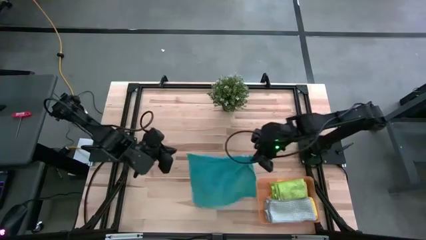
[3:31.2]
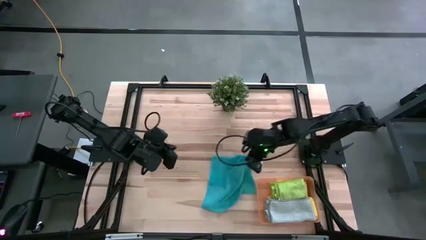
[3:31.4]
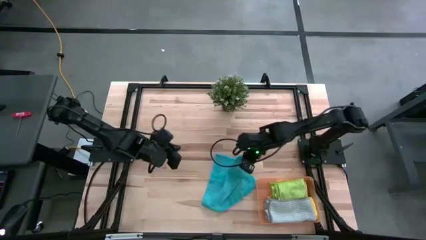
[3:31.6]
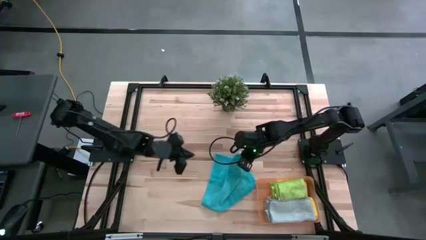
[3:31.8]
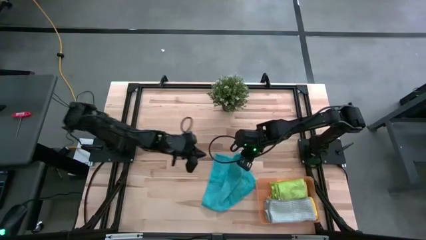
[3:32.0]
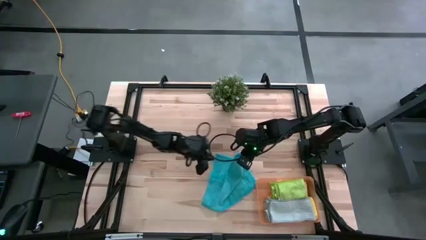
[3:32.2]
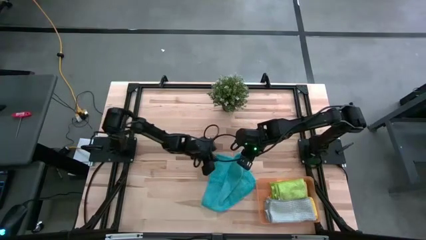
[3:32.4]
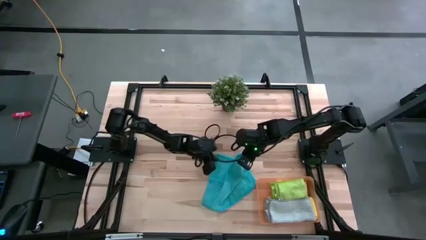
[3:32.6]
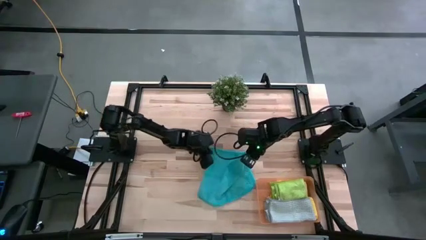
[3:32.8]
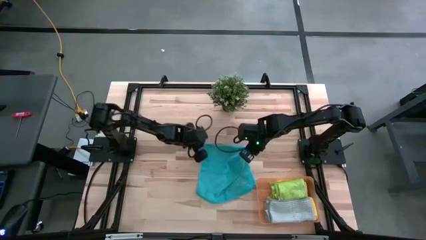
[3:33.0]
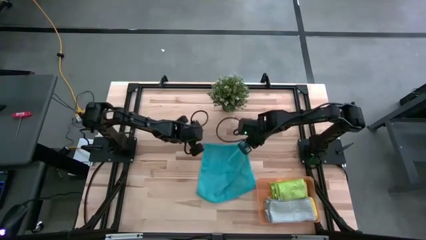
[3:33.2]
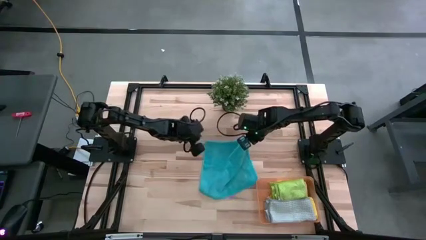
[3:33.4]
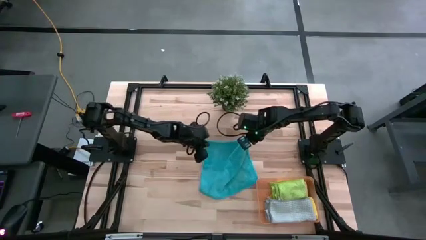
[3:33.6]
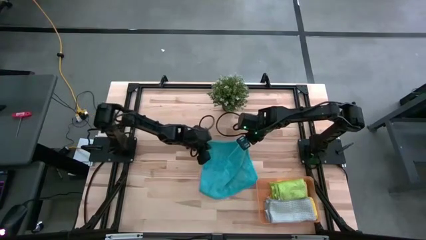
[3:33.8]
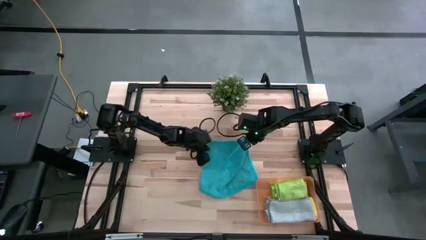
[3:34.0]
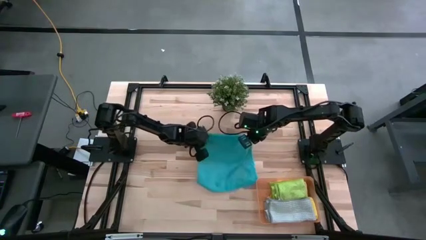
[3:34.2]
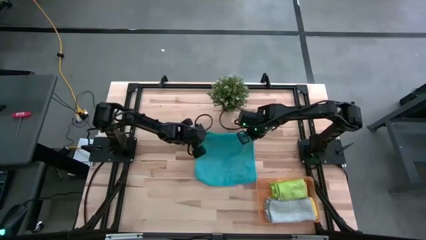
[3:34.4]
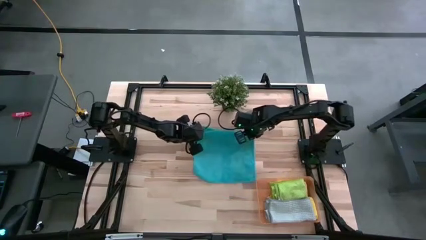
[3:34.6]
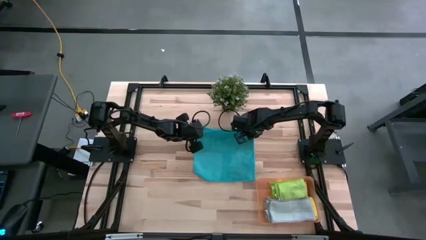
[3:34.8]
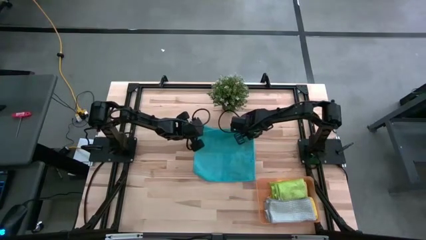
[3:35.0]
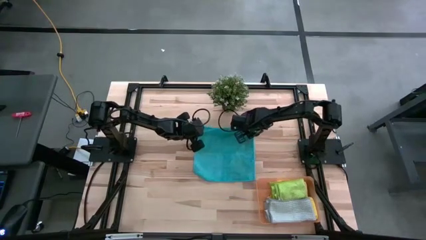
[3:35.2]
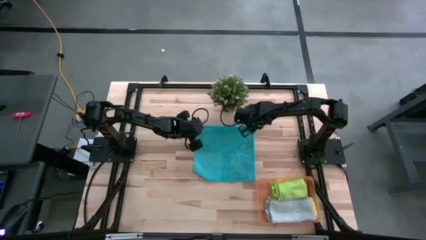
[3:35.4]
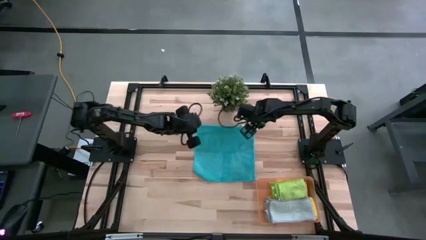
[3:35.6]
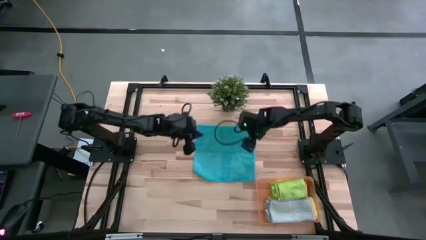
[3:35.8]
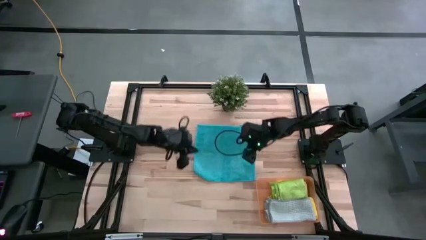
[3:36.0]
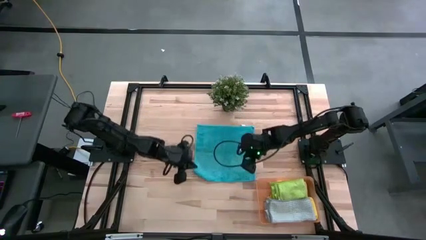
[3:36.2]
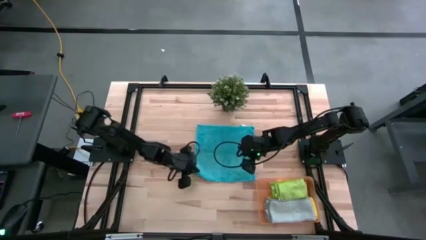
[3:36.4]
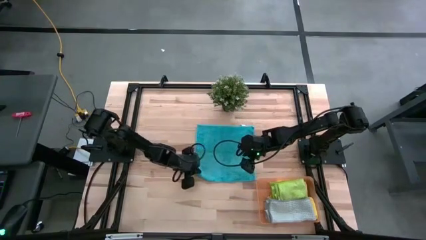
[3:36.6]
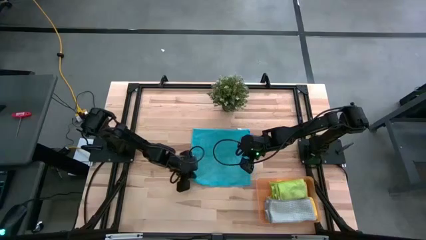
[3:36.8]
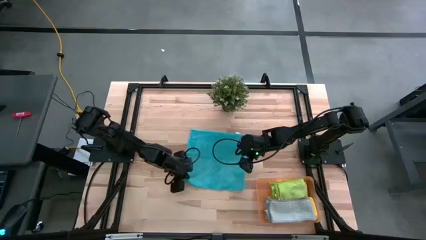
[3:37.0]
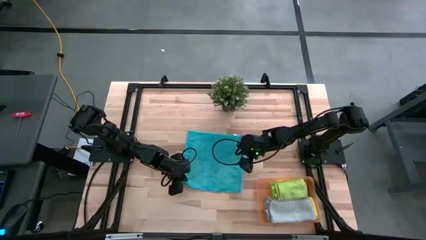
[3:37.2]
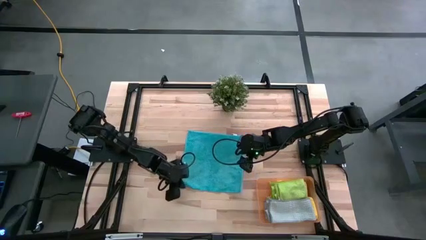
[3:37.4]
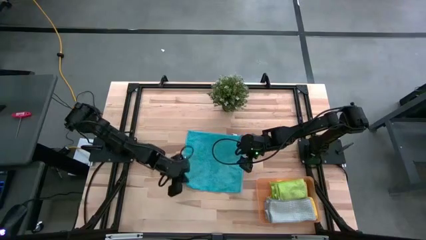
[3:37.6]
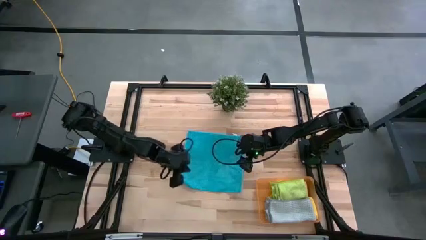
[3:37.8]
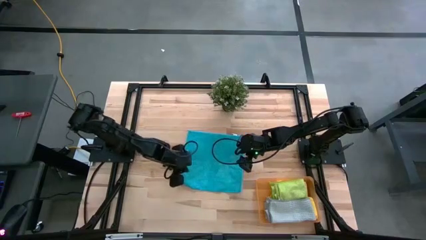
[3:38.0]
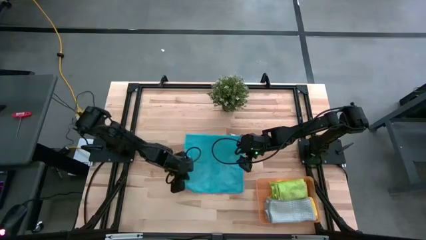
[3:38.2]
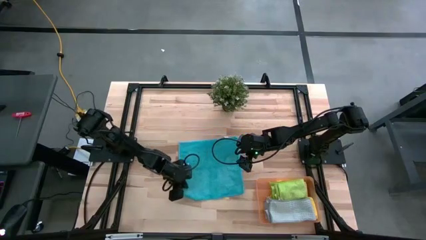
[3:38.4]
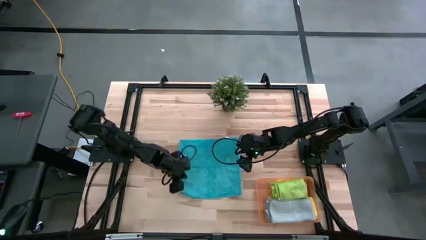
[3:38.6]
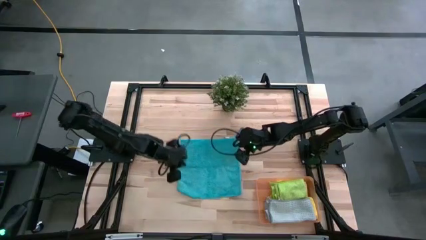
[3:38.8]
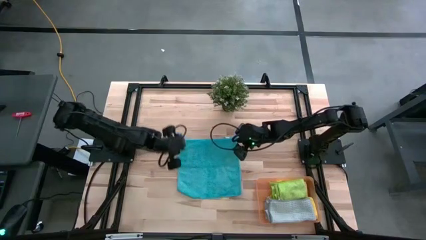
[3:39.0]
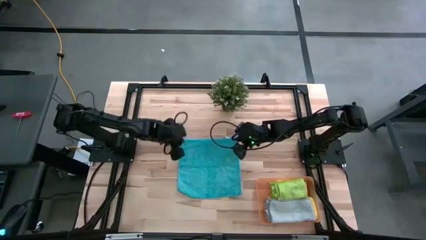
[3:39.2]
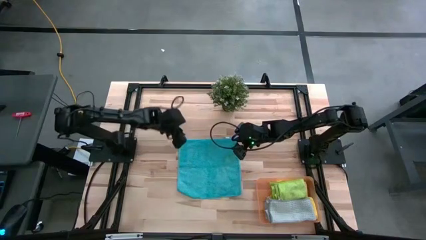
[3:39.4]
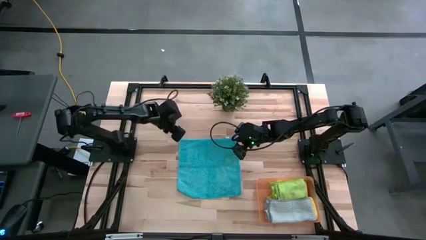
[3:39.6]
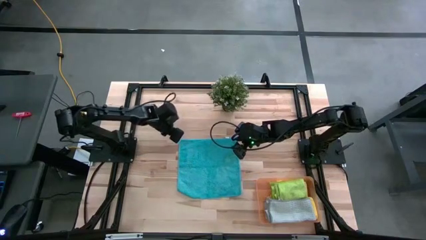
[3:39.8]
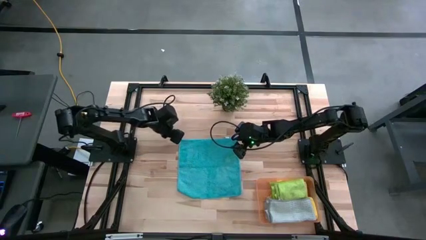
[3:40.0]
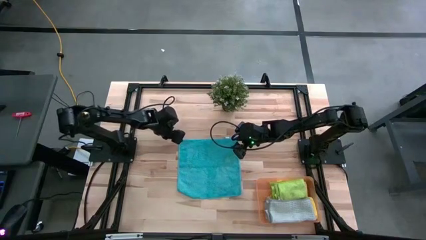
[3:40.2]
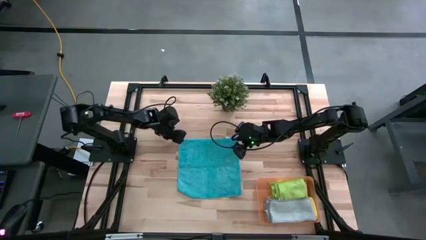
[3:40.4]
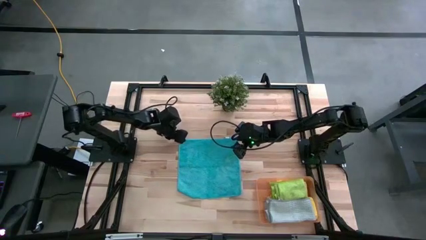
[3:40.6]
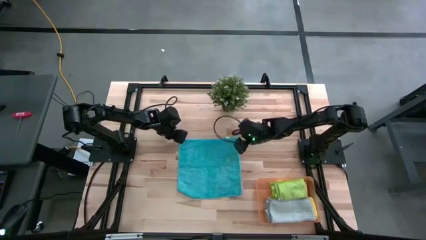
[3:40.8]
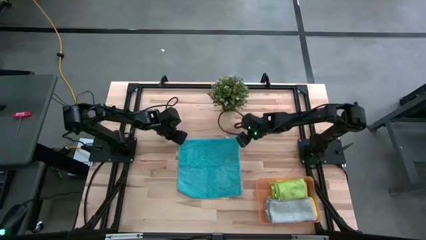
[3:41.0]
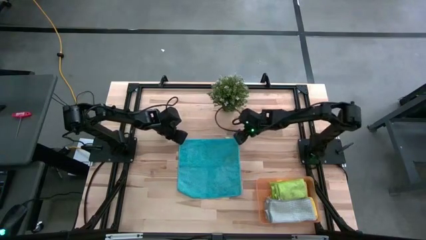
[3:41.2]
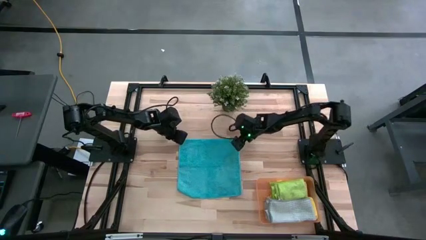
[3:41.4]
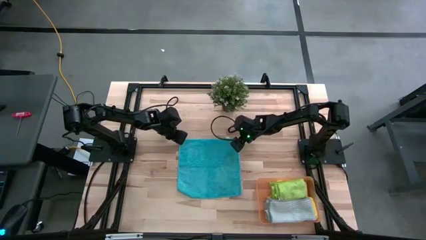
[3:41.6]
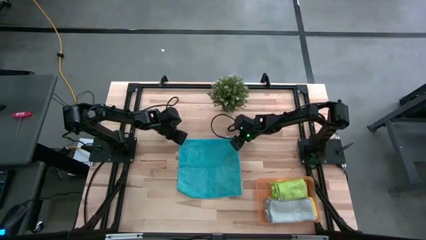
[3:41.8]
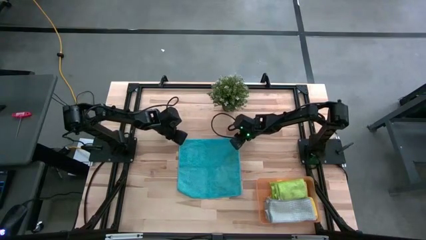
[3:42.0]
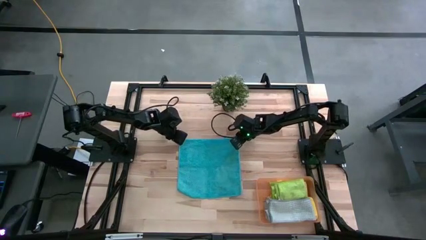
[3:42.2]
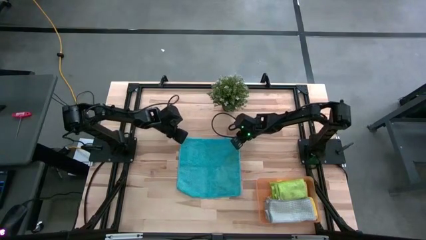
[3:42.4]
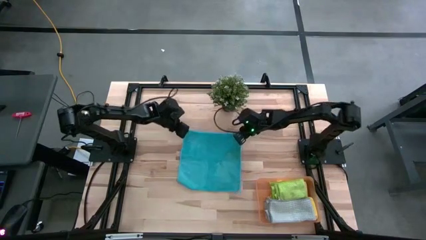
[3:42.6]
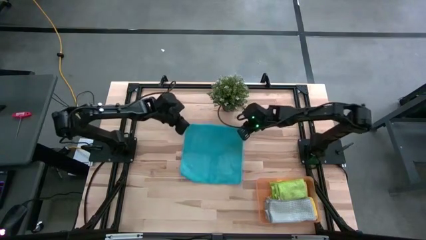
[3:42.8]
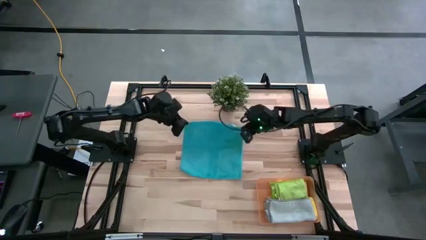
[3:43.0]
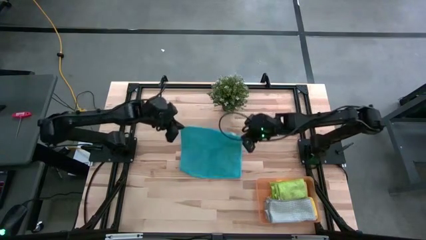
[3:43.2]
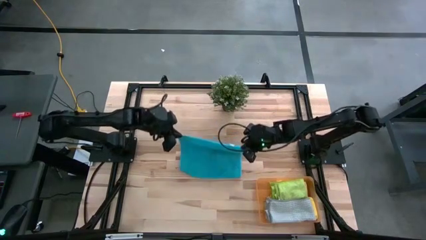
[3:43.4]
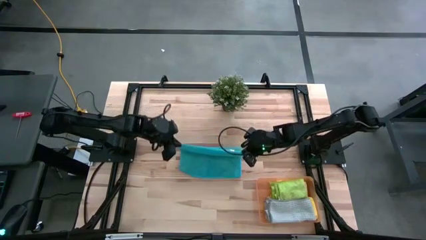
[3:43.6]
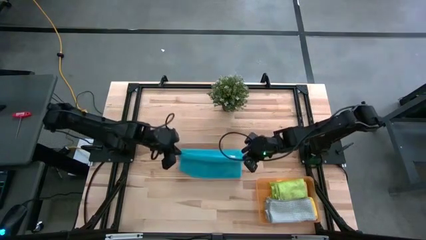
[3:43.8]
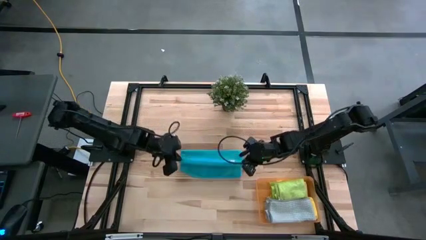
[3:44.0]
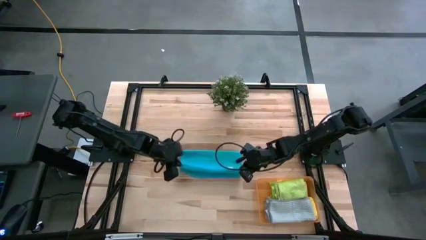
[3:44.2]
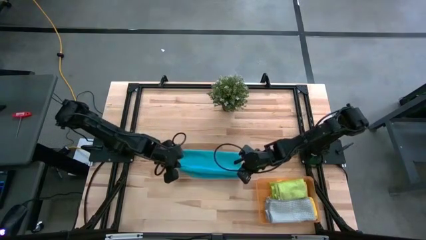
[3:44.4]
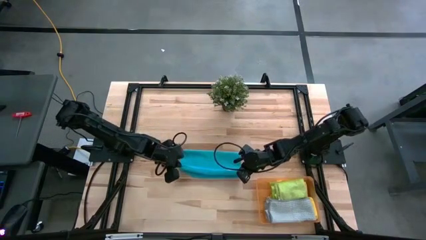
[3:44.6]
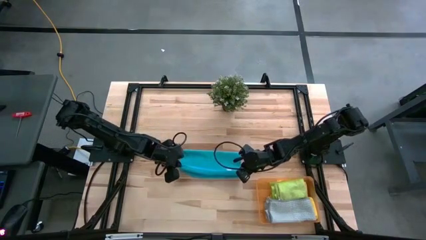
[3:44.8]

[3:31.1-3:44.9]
Task: Fold microfiber towels
Fold the blue microfiber towel

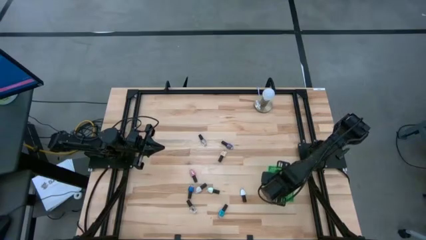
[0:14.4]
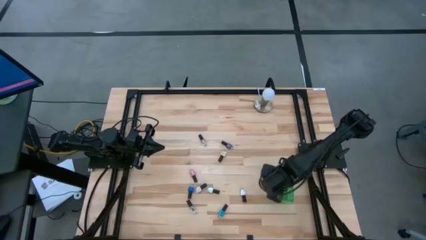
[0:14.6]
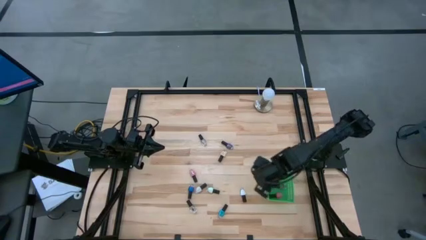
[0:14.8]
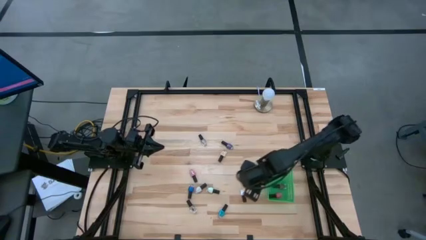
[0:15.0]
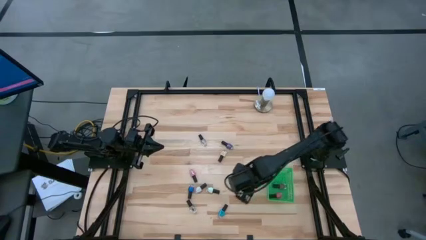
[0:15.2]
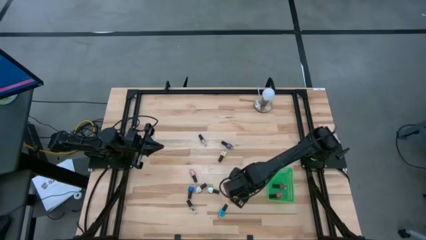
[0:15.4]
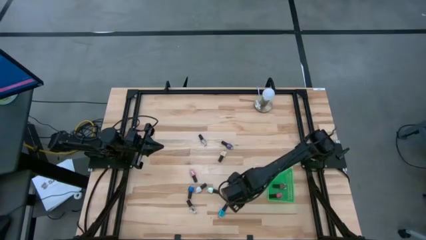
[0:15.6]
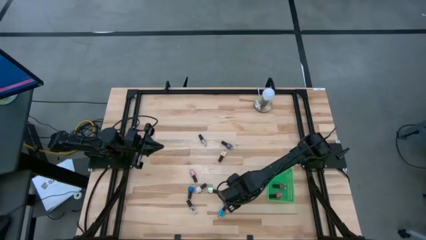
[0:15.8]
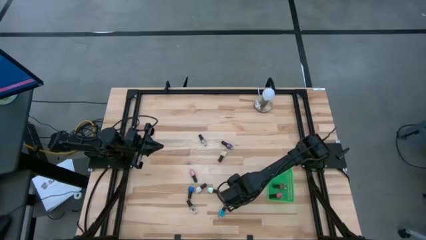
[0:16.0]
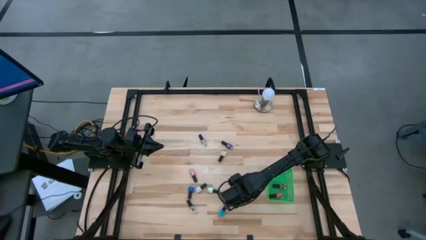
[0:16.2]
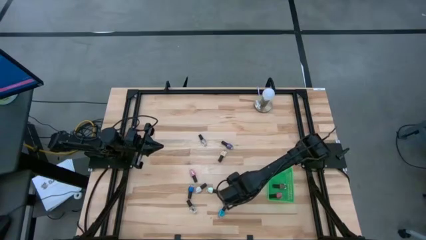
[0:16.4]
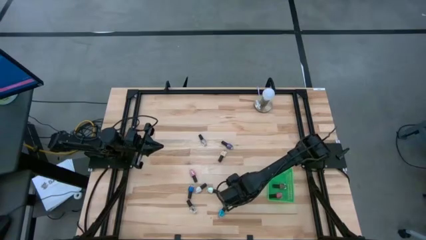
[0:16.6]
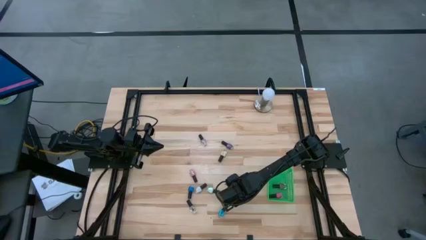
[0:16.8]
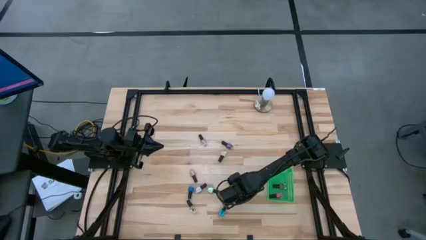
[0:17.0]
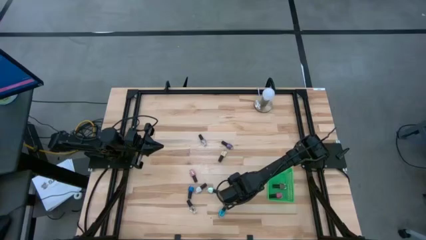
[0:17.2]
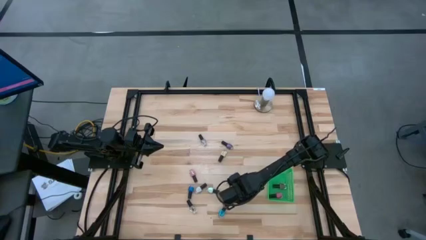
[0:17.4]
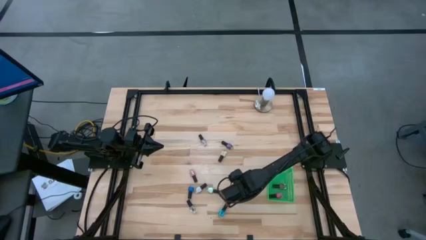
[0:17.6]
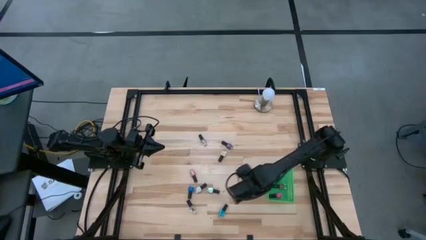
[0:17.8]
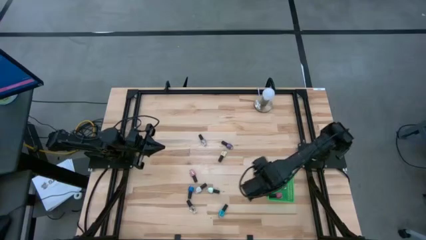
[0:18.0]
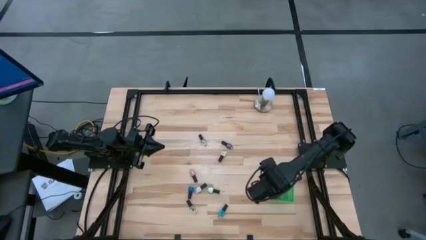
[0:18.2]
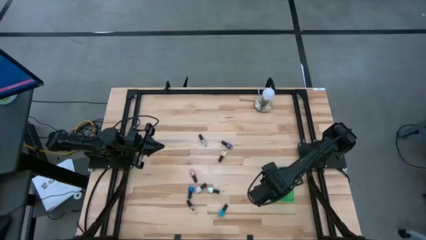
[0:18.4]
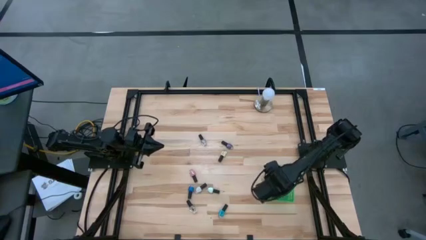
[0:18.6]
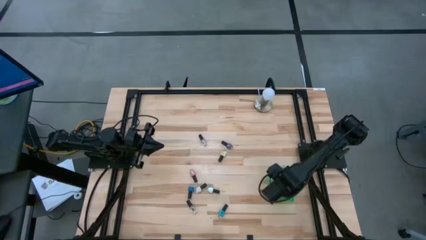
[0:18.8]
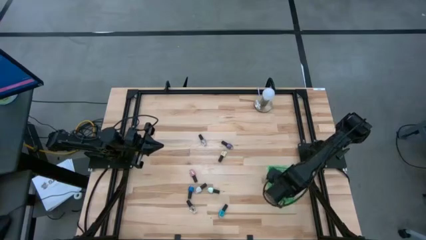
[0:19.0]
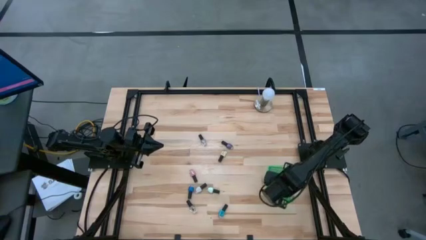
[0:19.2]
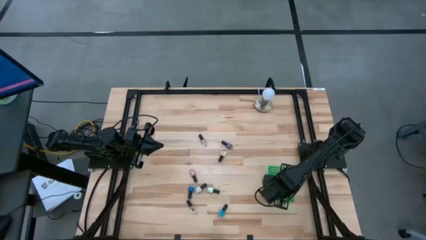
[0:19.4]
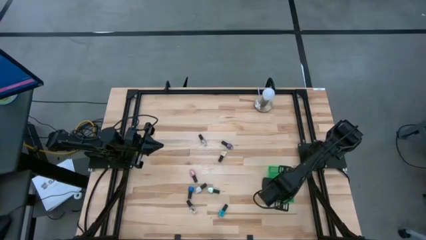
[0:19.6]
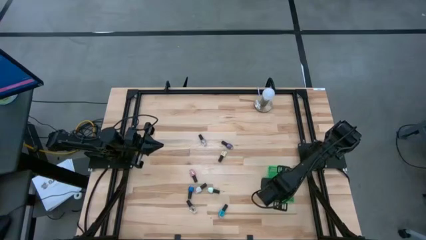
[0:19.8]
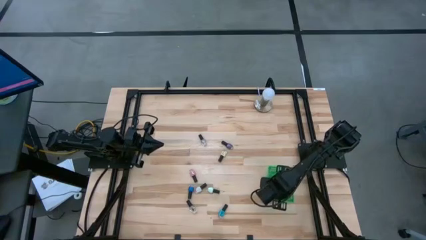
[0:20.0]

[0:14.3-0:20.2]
Task: Pick & Place Nail Polish
Put the right white nail polish into the green bin
